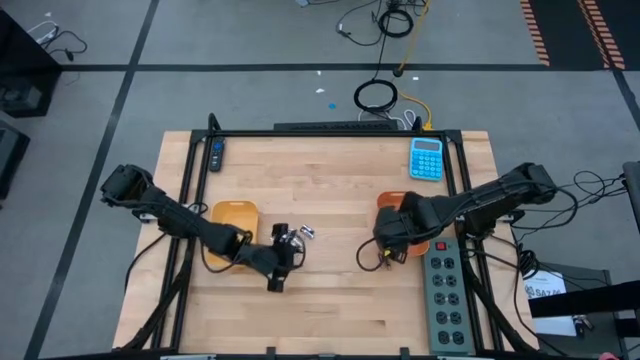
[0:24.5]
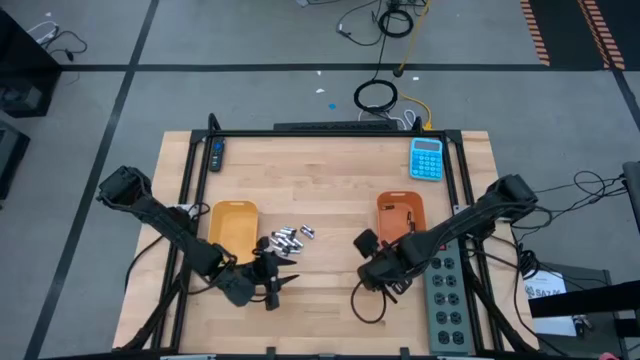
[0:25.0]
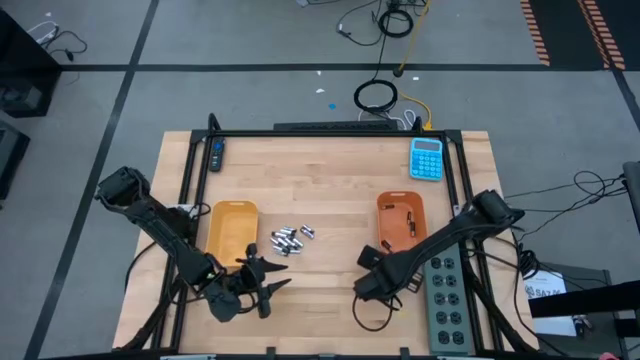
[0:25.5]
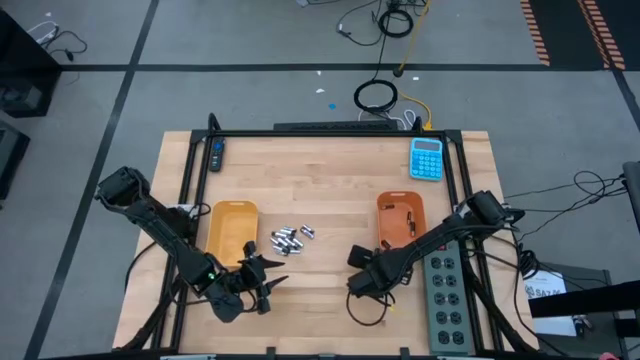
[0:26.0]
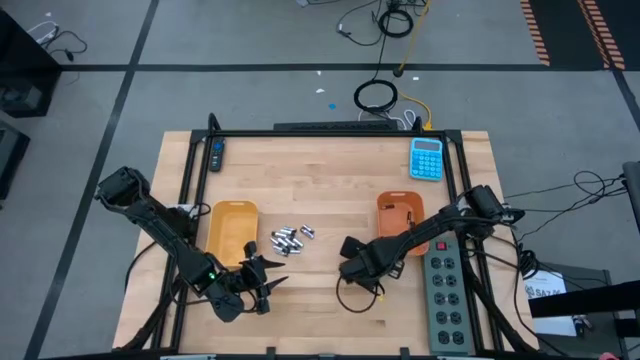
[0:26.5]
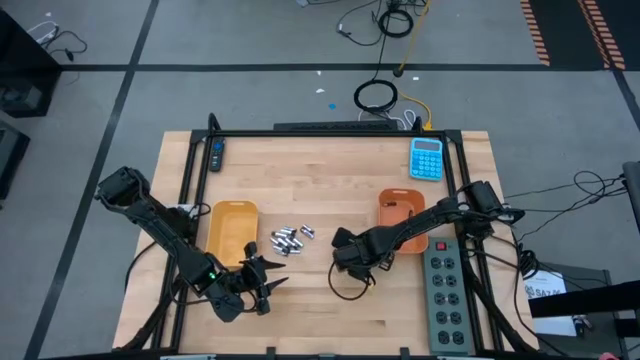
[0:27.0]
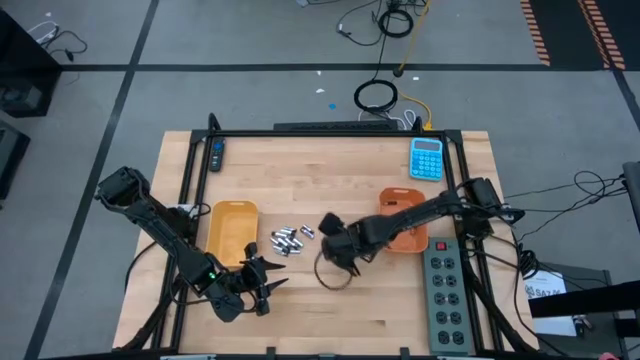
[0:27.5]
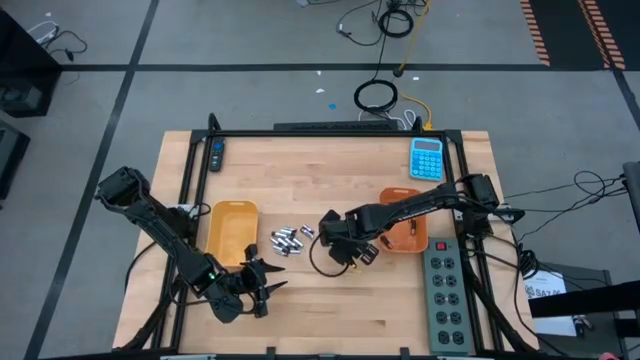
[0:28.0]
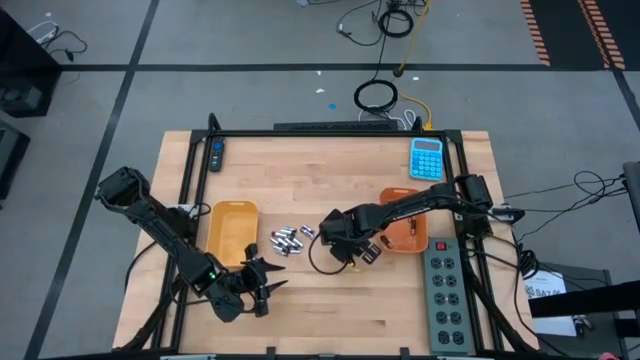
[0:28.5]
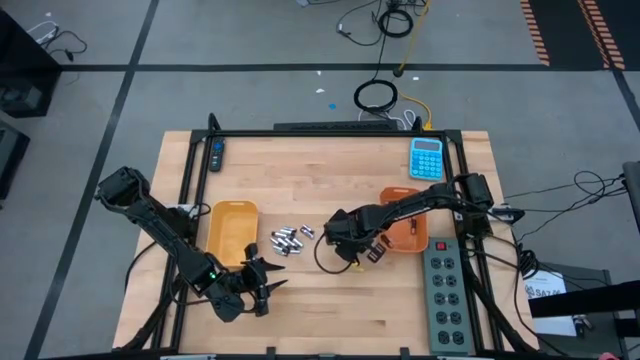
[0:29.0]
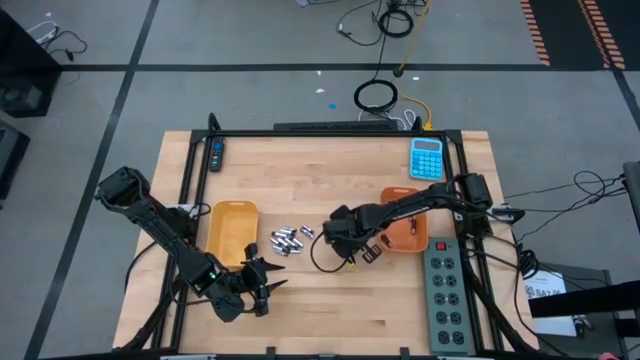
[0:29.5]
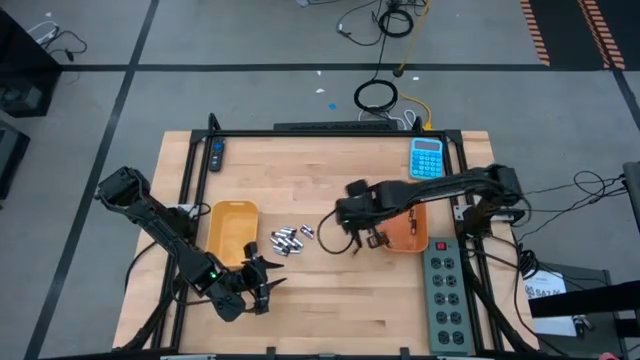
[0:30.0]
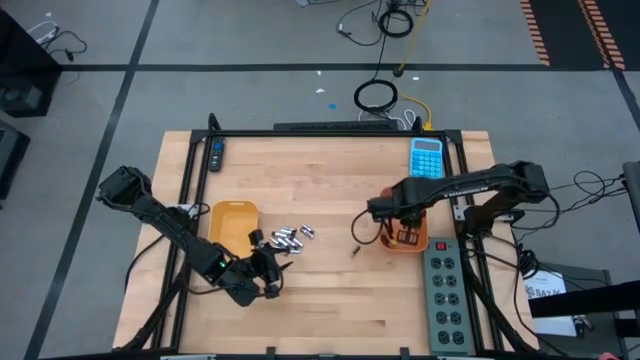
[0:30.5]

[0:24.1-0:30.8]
Task: Sort batteries
Put the brown battery into the orange bin

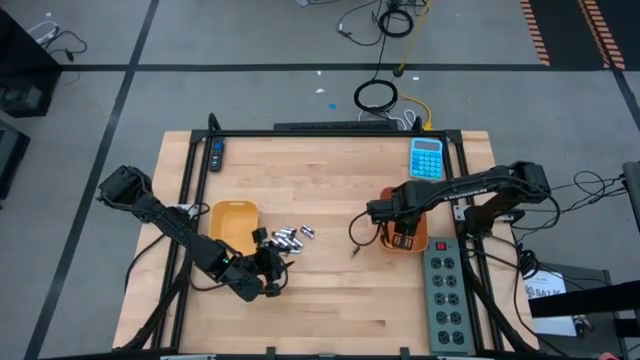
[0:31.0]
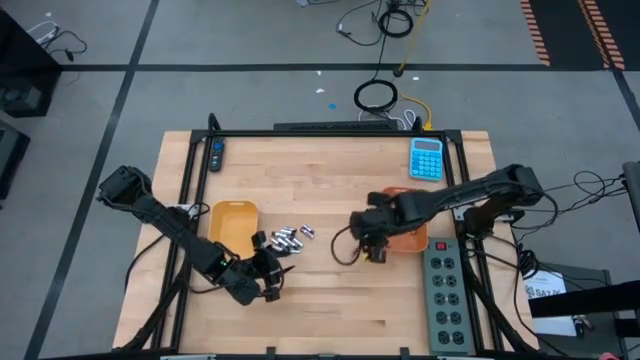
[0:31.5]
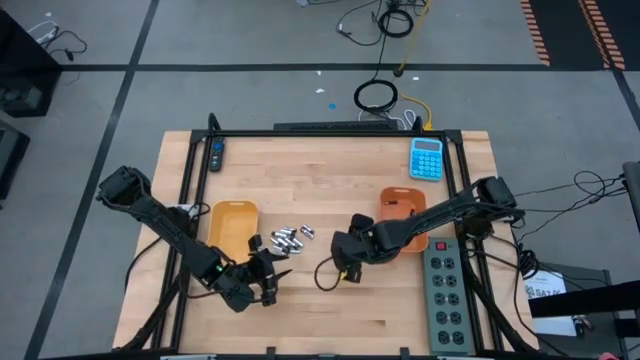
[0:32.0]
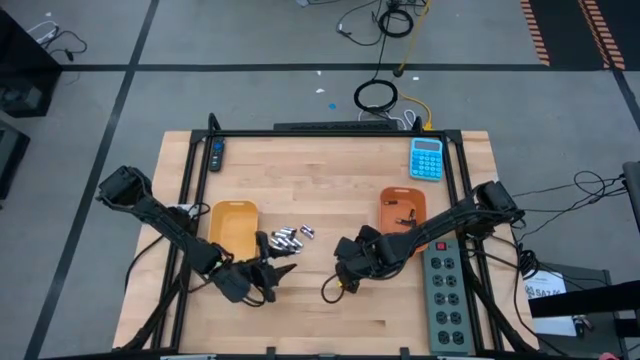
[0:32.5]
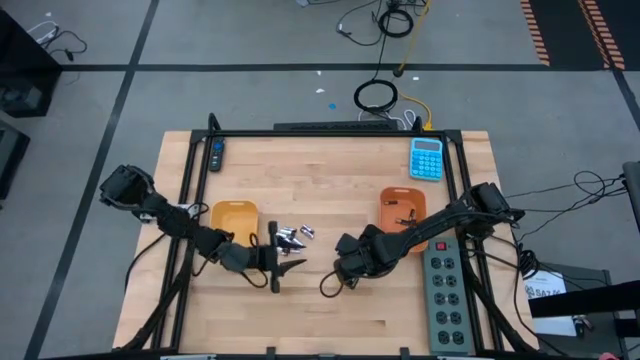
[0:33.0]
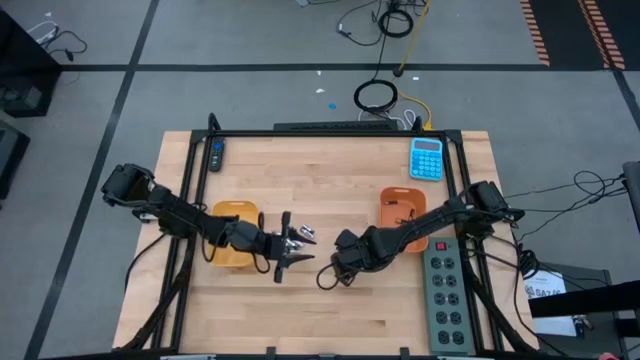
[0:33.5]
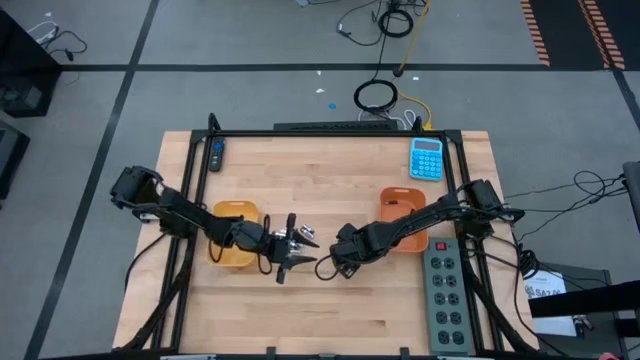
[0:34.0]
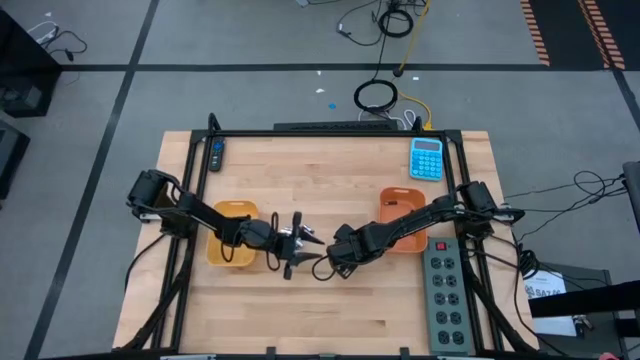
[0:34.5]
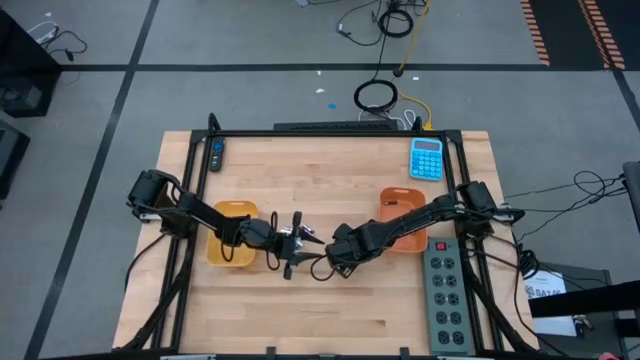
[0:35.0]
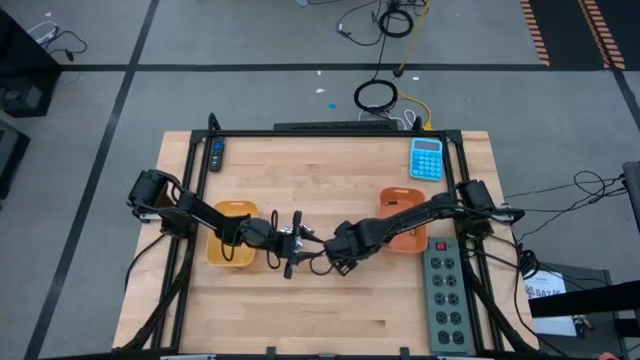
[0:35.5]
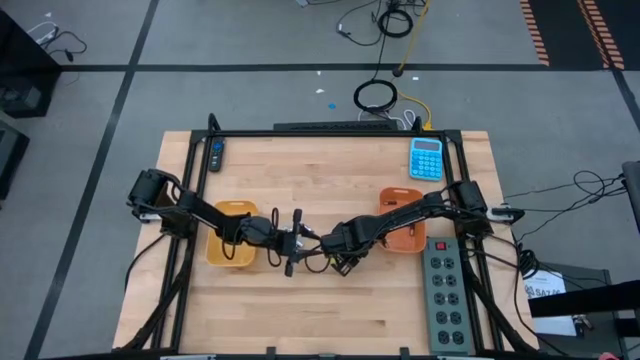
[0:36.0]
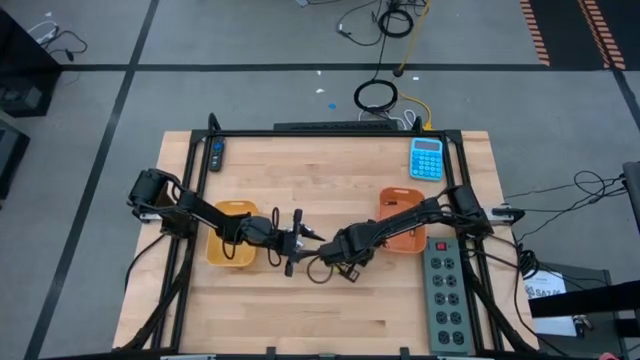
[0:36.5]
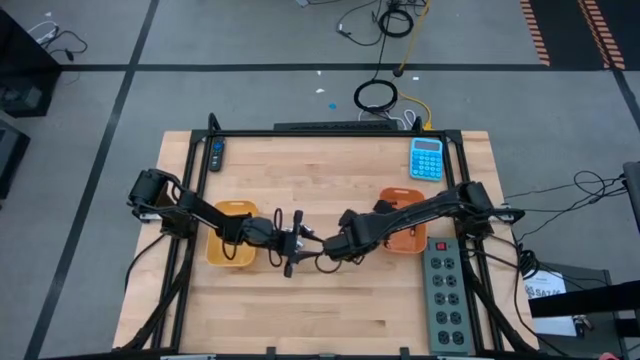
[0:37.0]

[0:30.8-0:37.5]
Put the brown battery into the orange bin

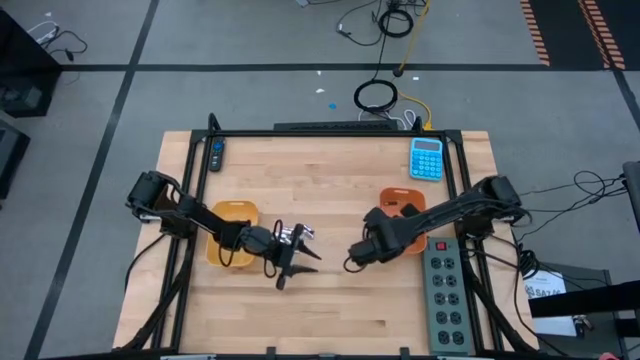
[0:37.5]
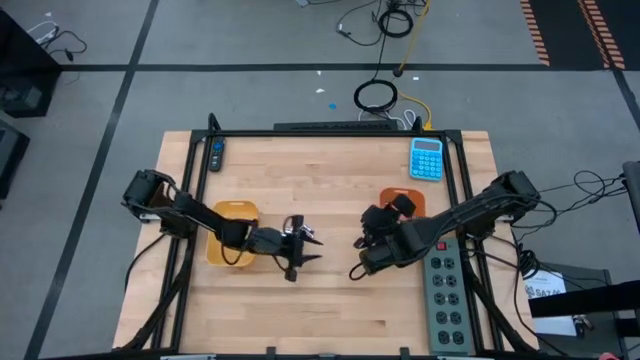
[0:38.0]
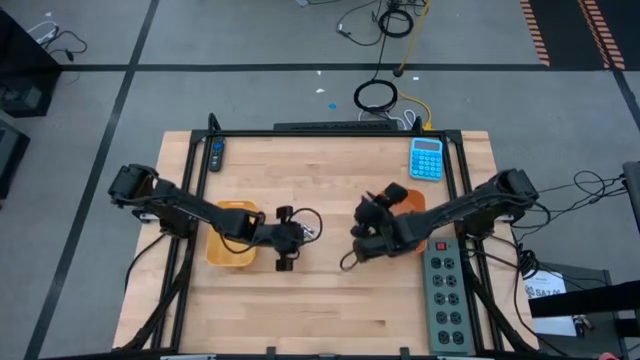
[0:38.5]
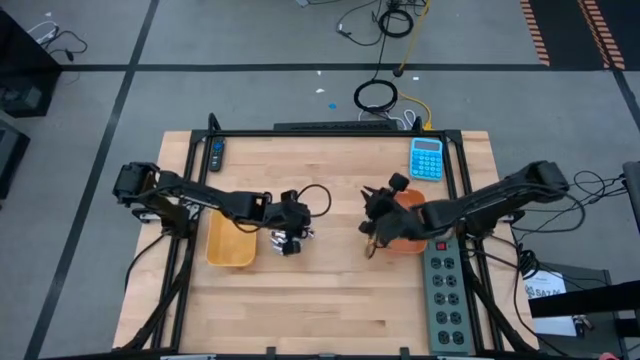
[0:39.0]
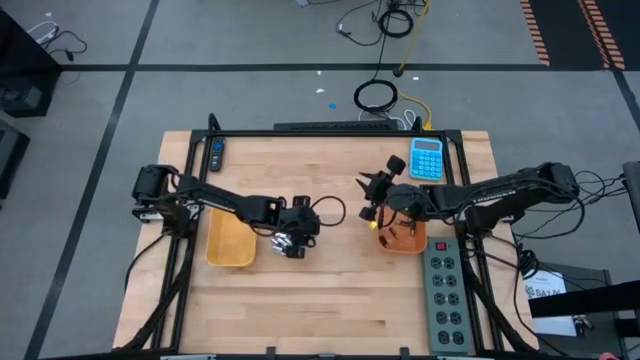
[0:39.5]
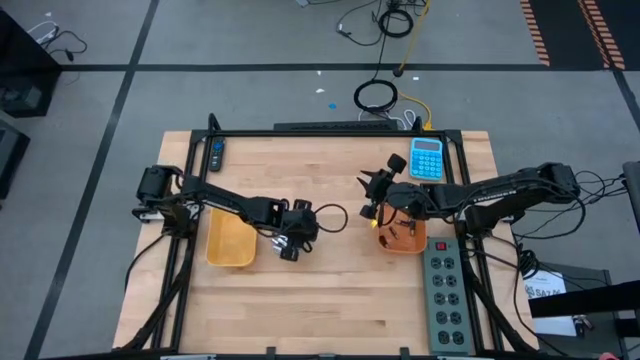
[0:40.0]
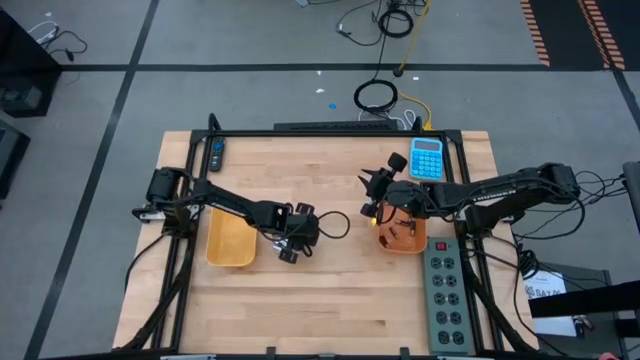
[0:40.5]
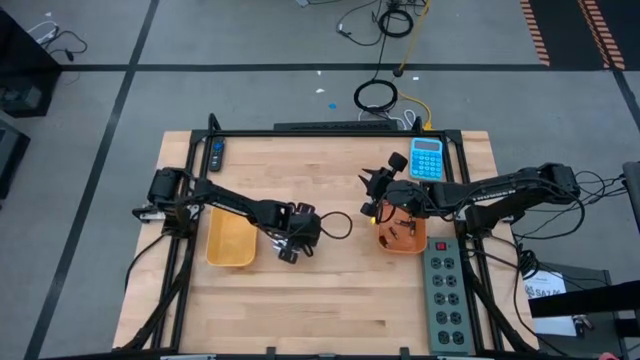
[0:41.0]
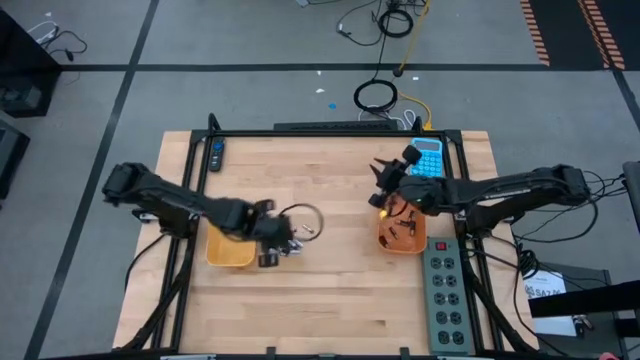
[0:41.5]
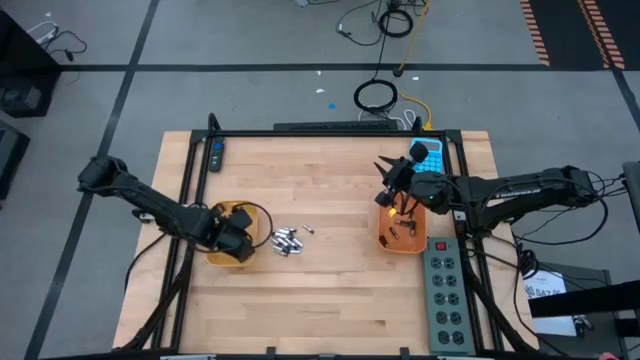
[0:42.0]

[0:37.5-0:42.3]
Put the silver battery into the yellow bin

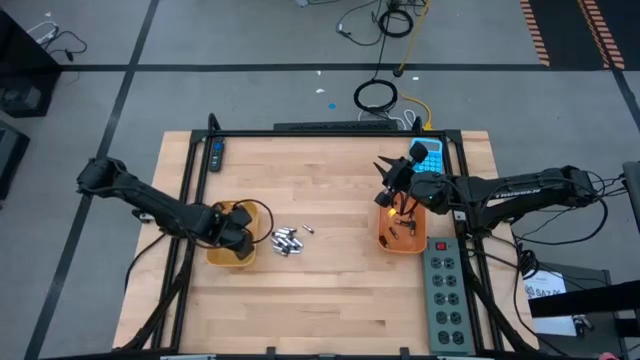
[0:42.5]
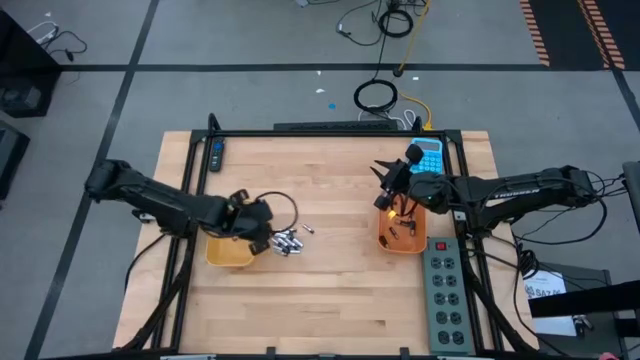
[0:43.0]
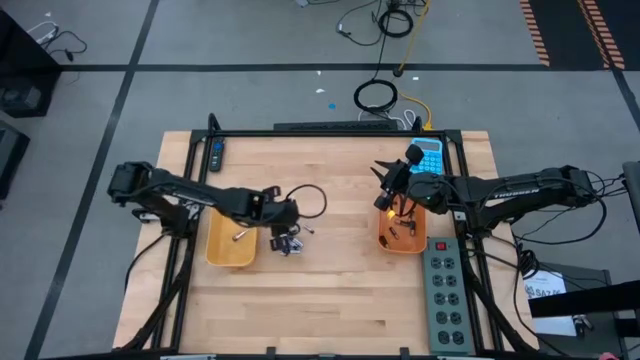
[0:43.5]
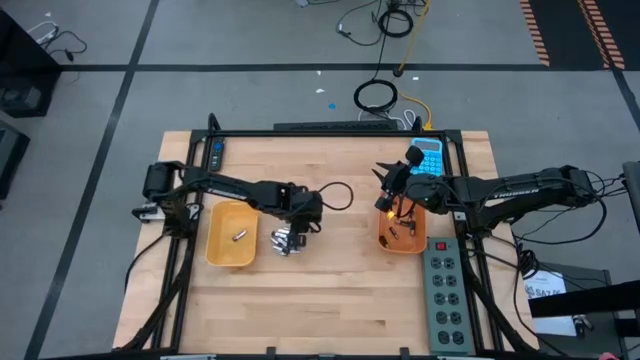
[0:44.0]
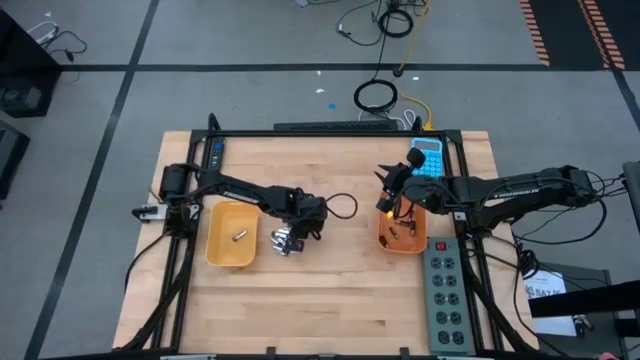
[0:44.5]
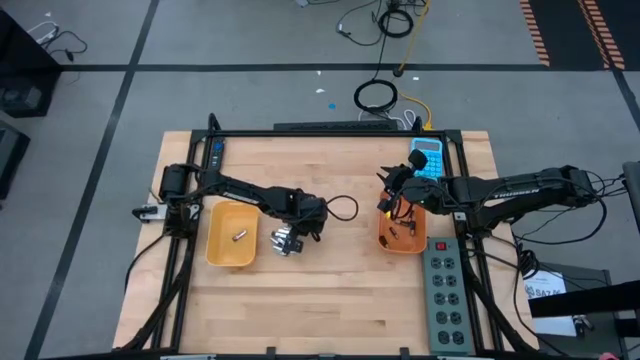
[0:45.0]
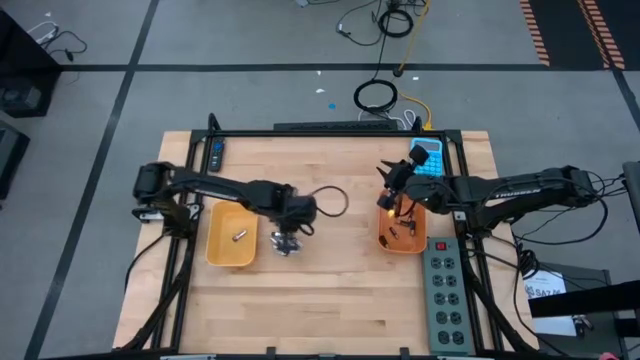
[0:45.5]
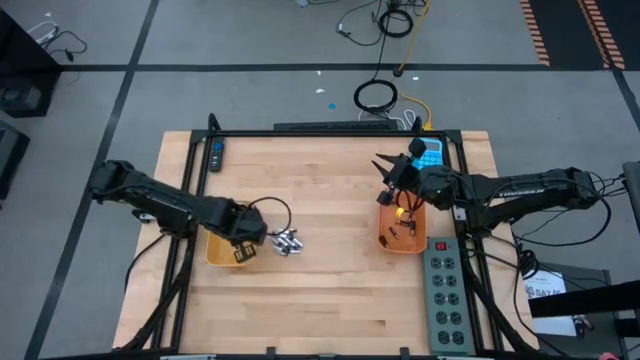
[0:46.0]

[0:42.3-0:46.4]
Put the silver battery into the yellow bin
